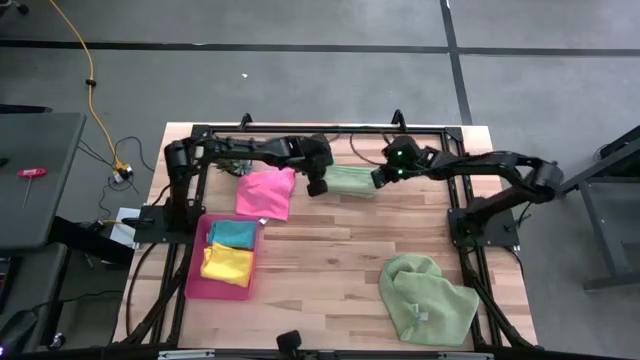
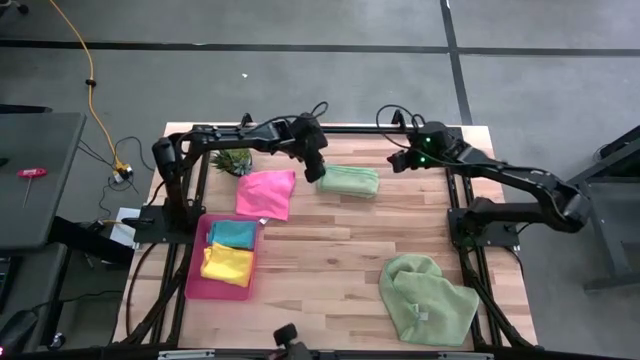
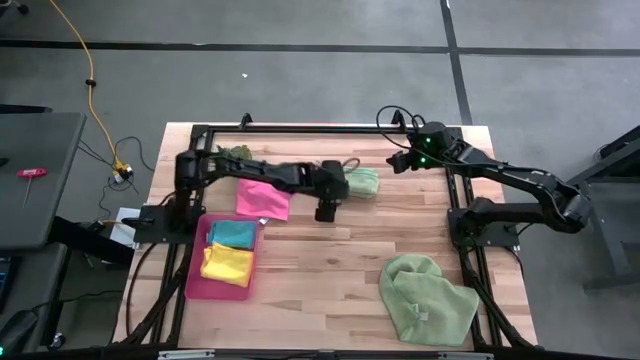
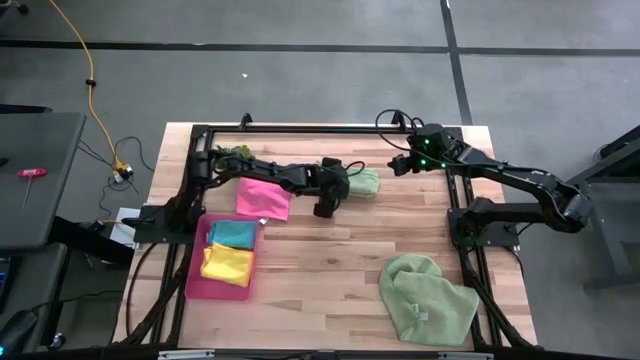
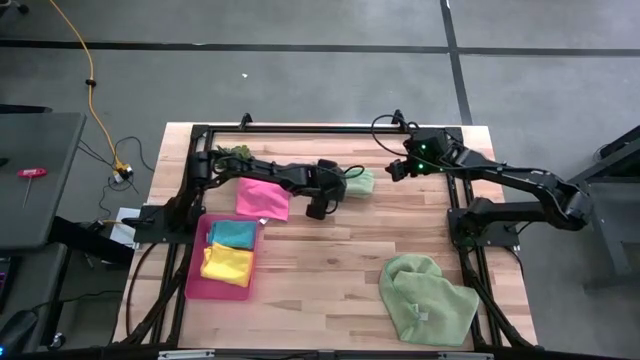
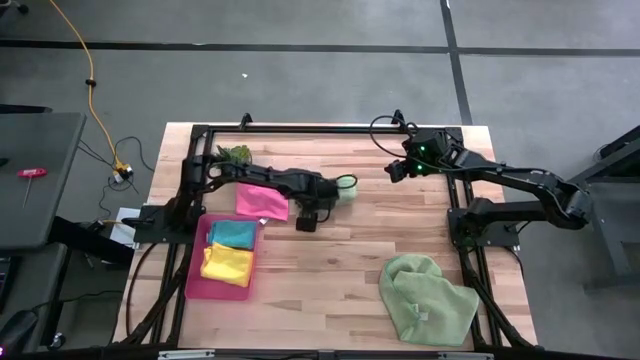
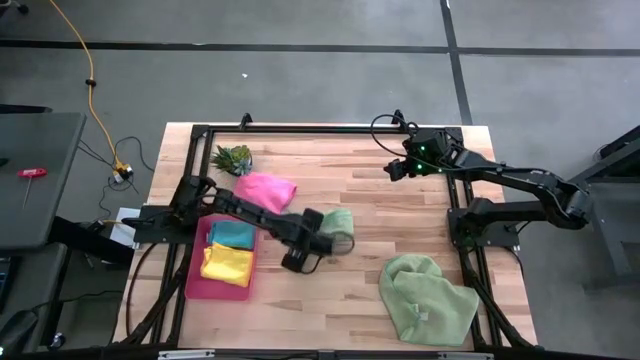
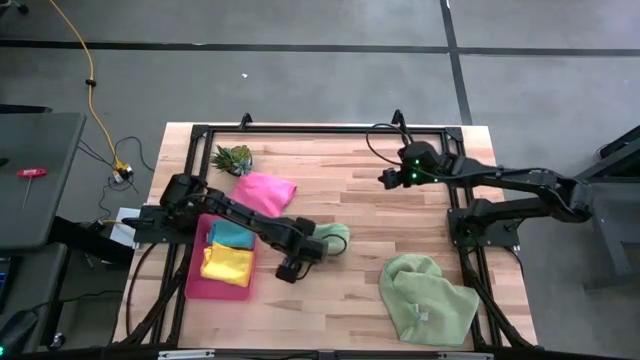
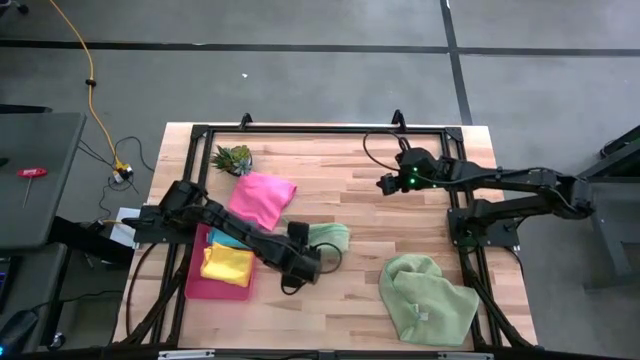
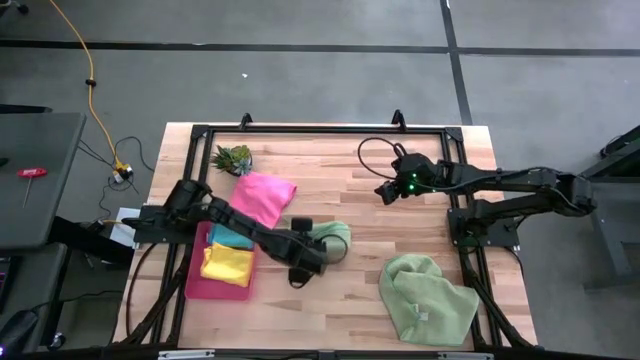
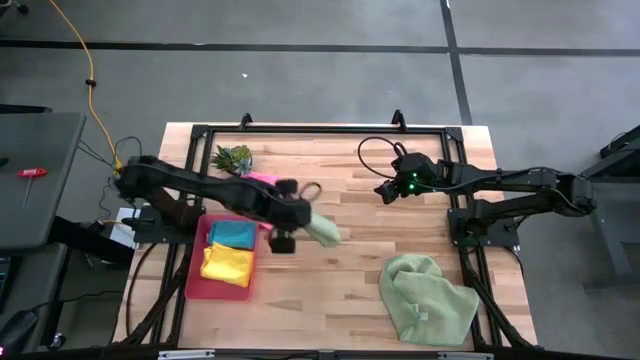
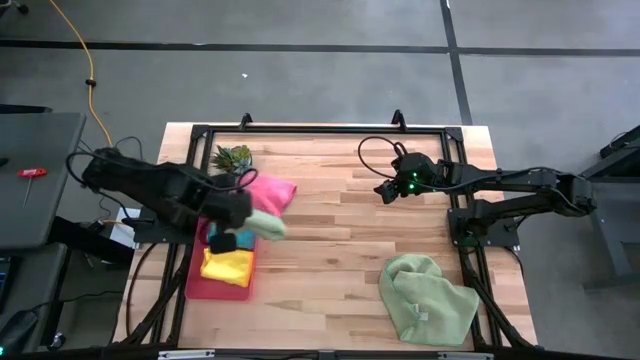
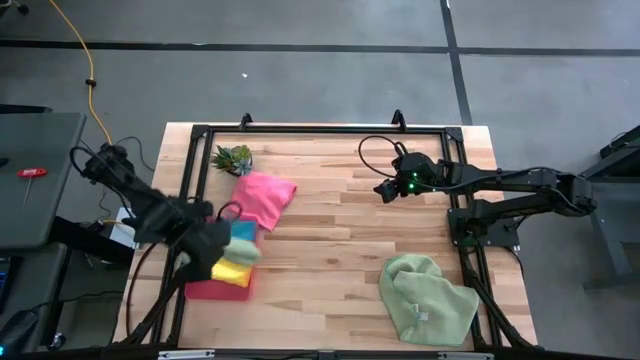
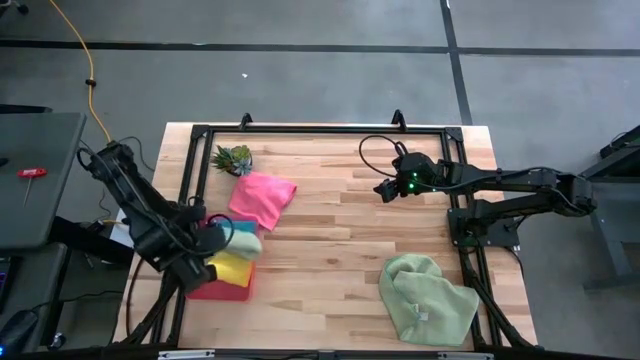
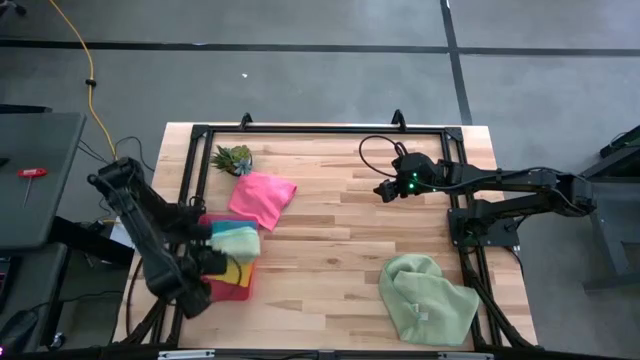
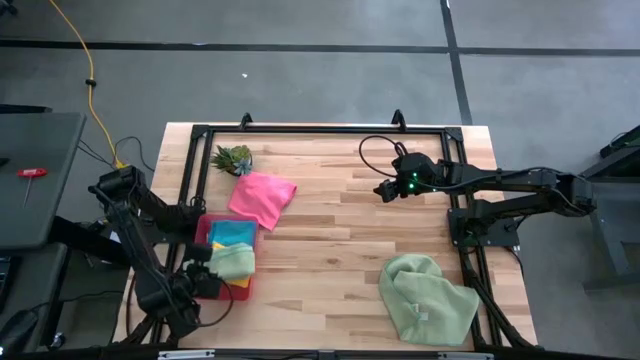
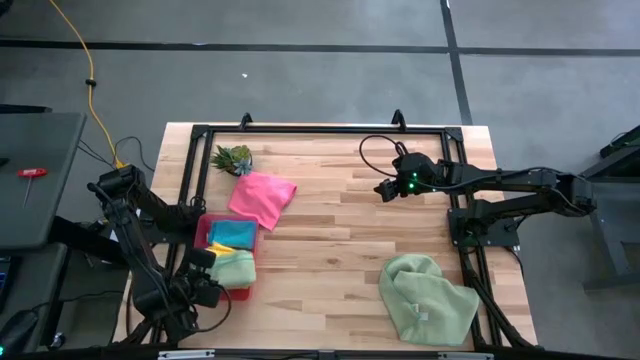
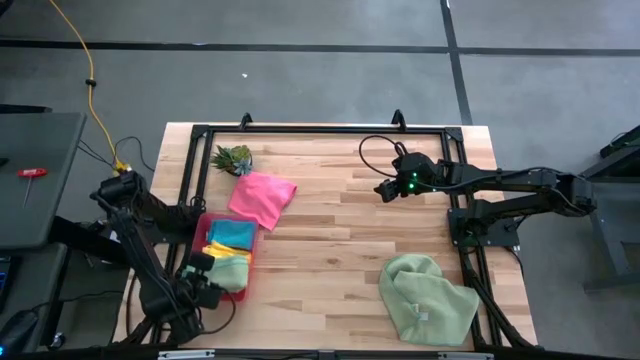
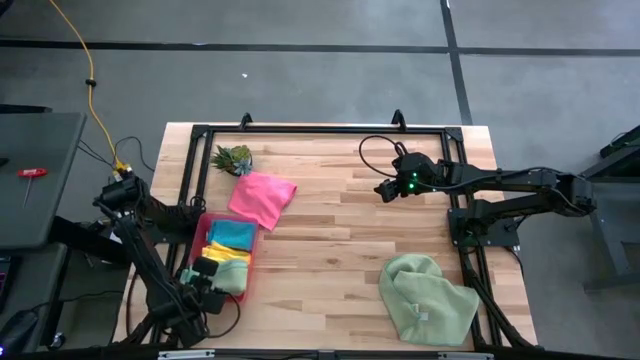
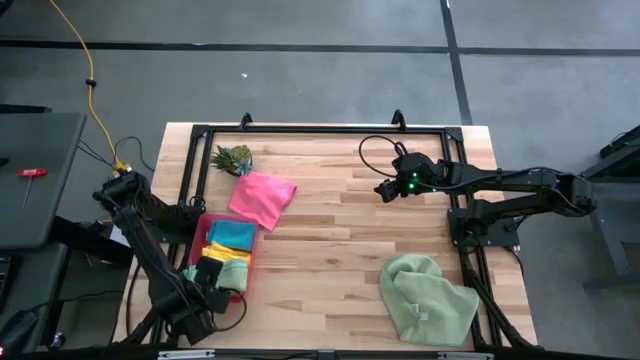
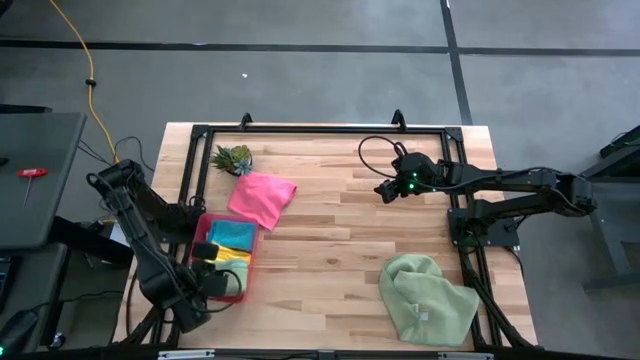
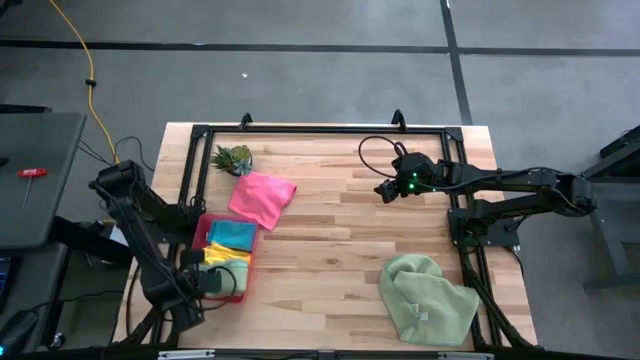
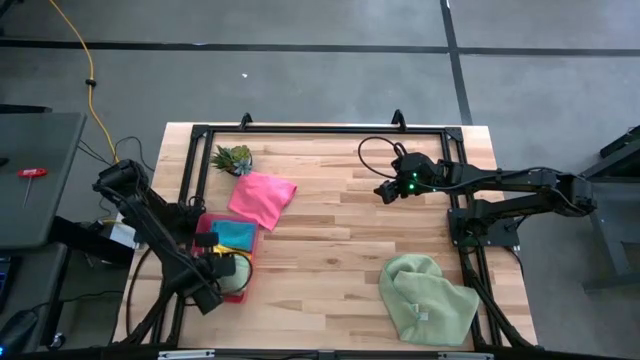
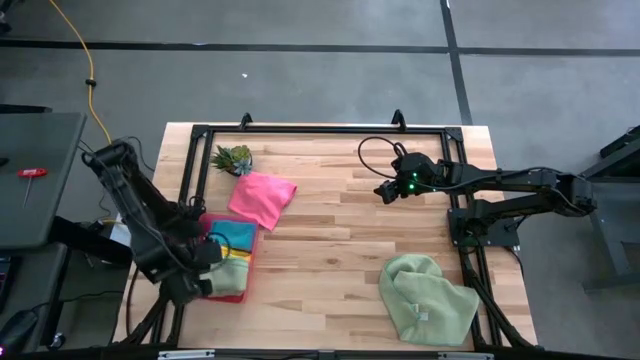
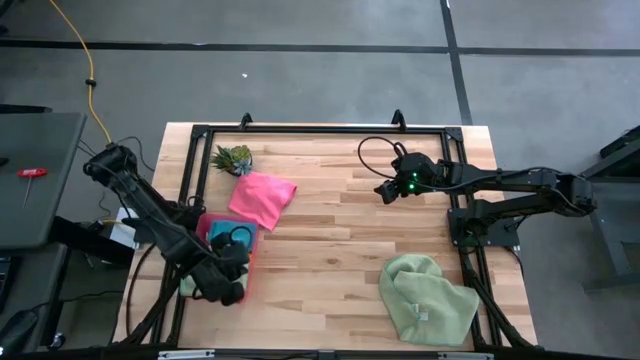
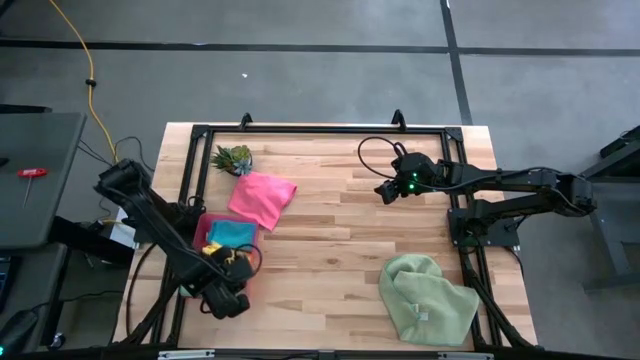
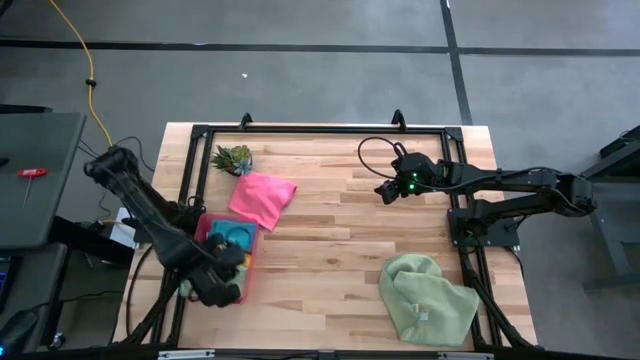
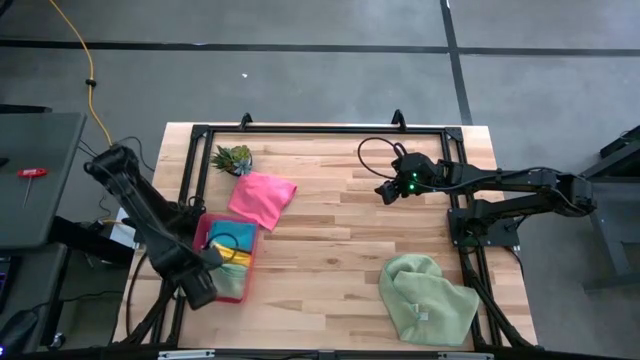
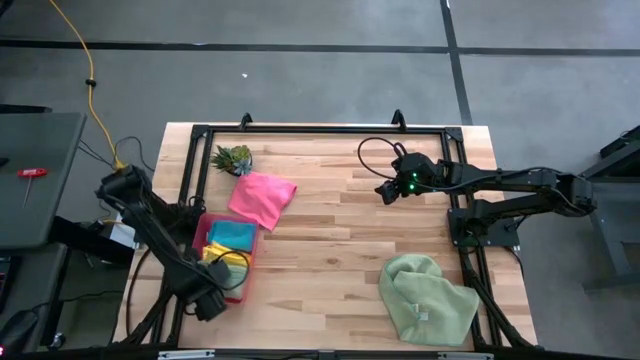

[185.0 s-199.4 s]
Task: Fold microfiber towels
Put the top green microfiber towel into the red bin
